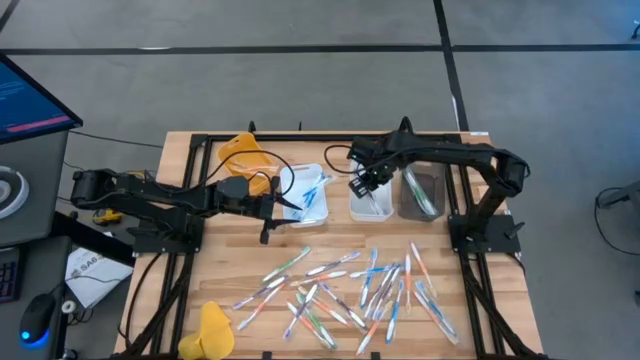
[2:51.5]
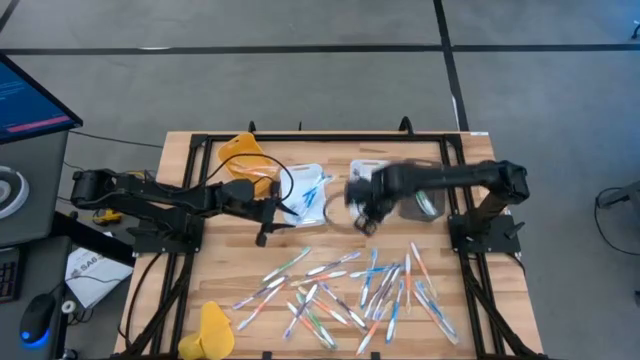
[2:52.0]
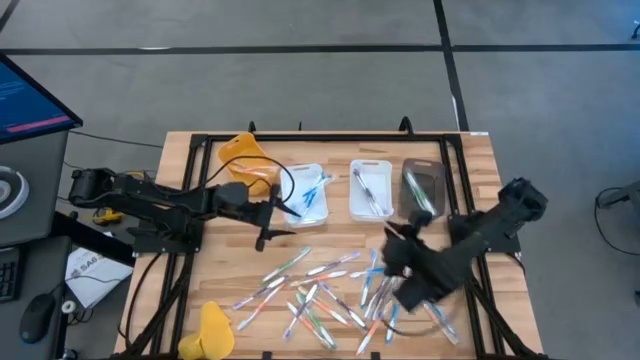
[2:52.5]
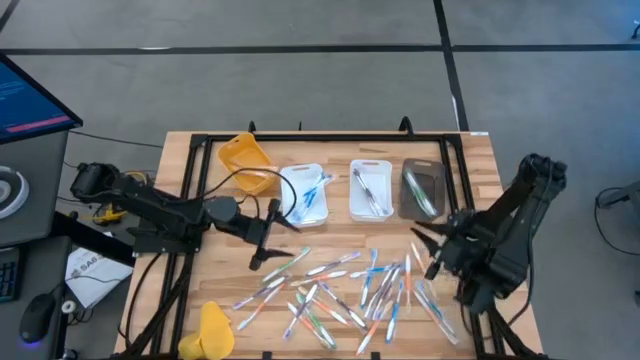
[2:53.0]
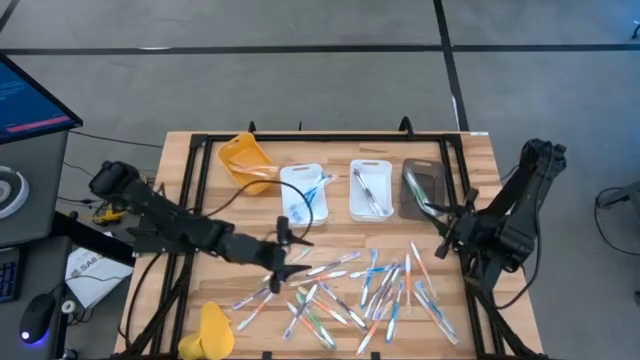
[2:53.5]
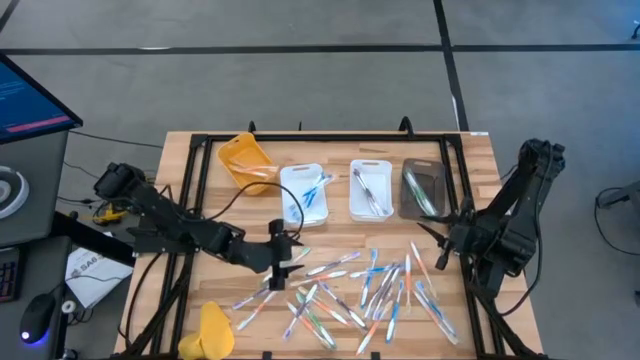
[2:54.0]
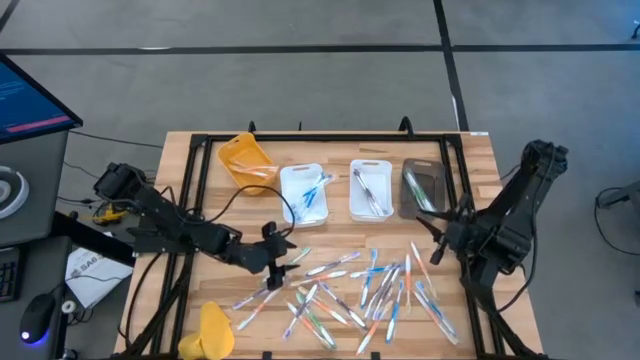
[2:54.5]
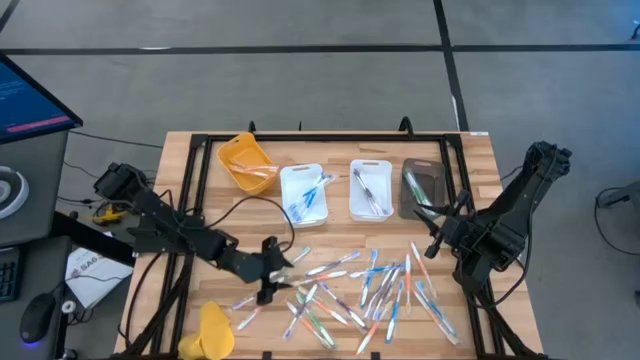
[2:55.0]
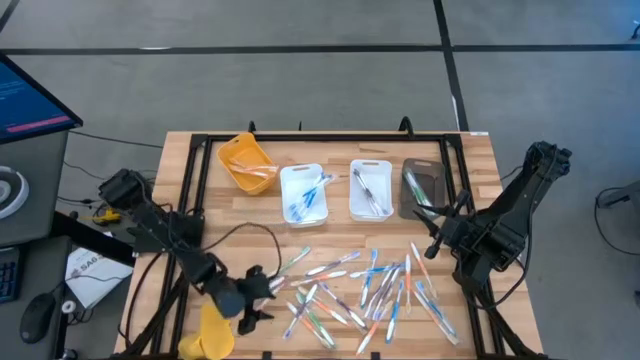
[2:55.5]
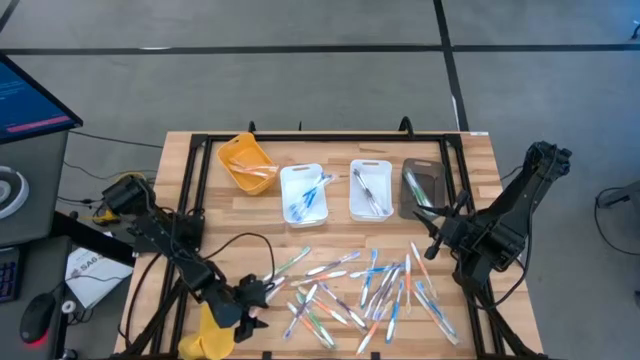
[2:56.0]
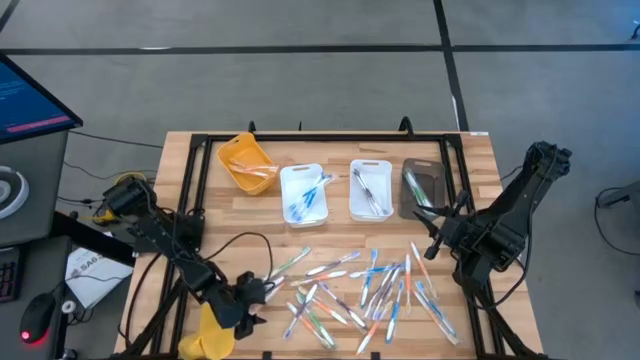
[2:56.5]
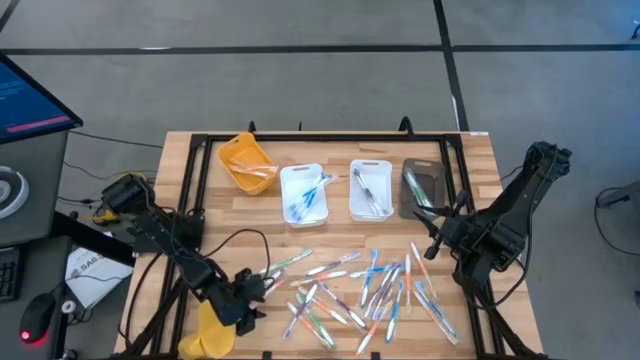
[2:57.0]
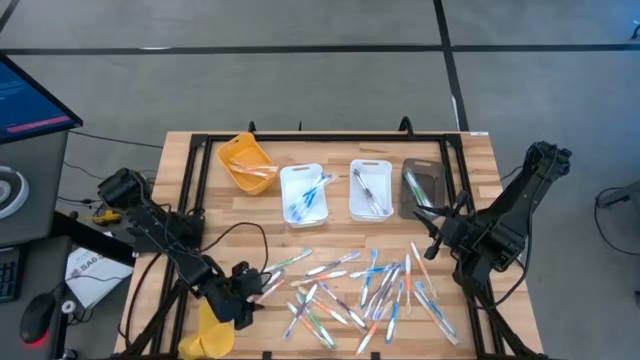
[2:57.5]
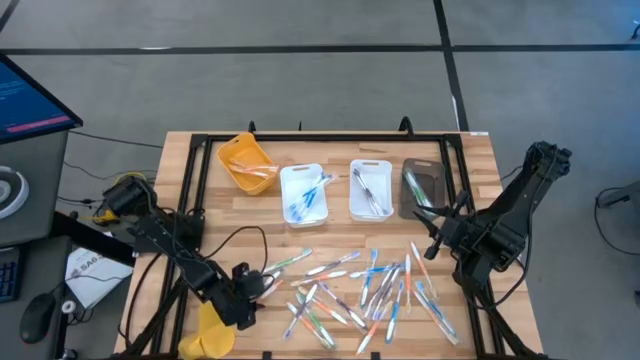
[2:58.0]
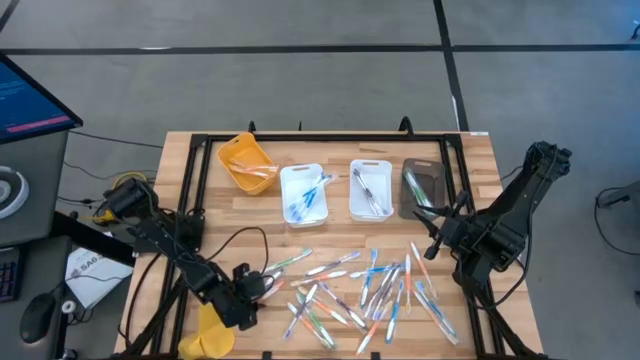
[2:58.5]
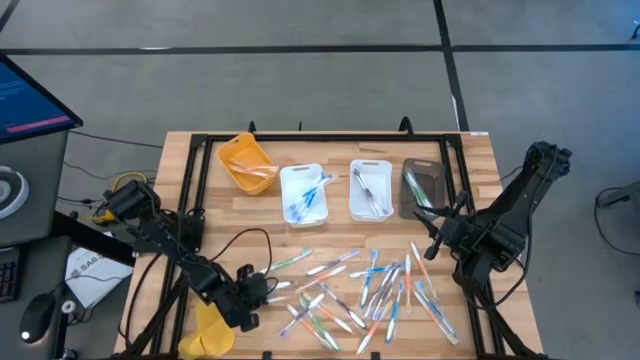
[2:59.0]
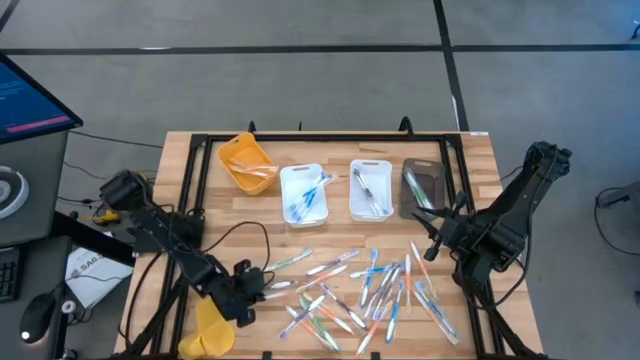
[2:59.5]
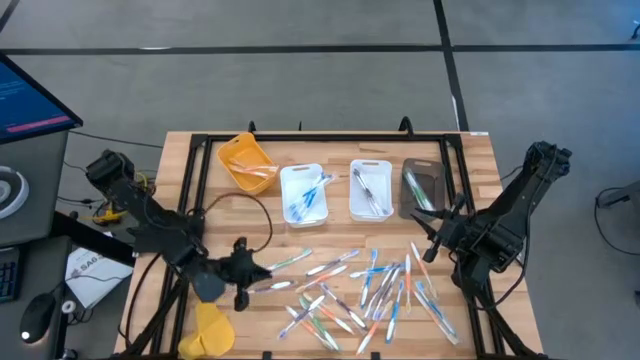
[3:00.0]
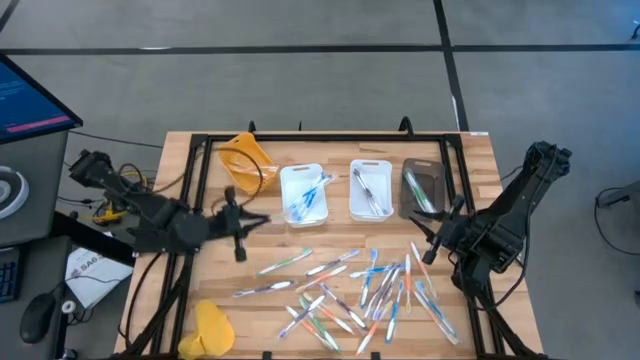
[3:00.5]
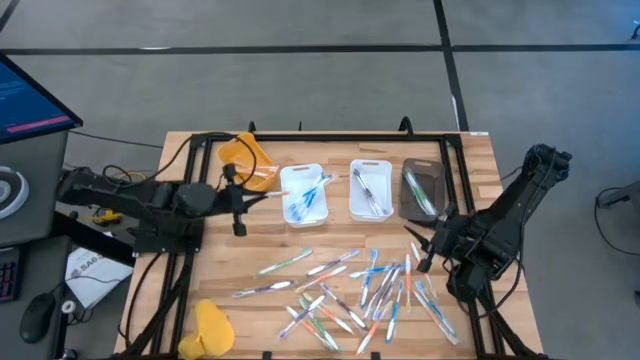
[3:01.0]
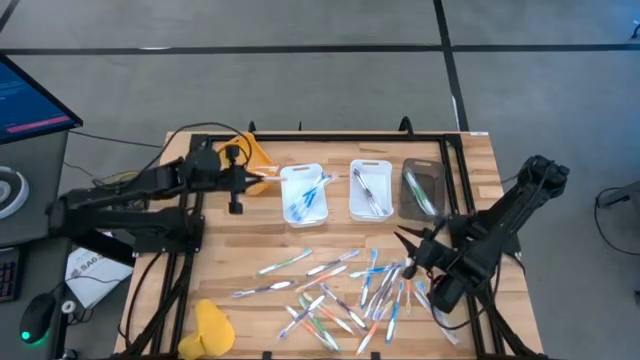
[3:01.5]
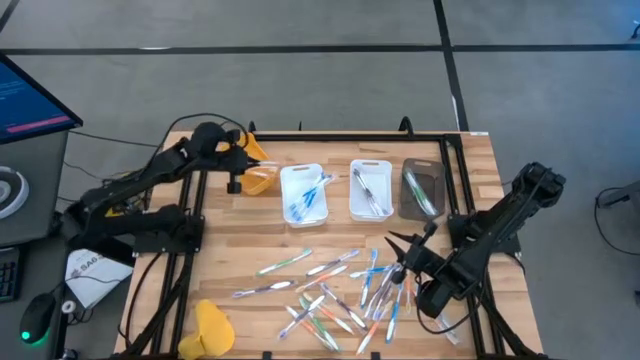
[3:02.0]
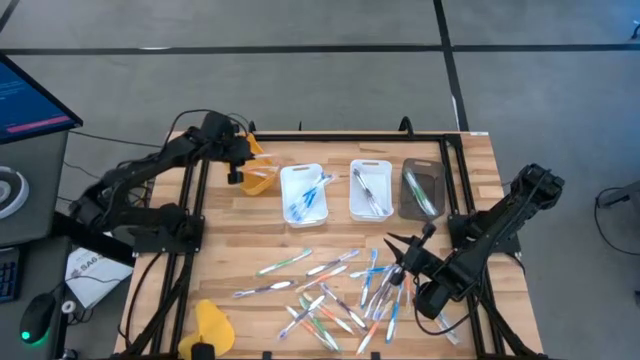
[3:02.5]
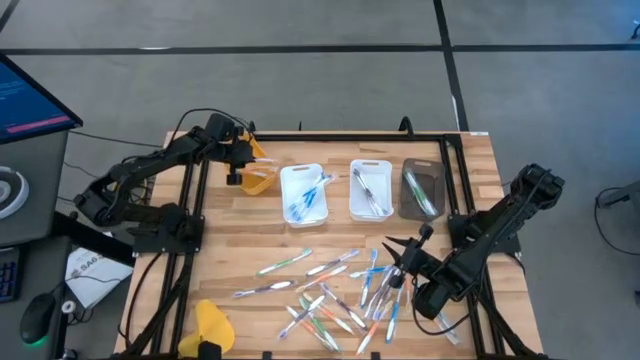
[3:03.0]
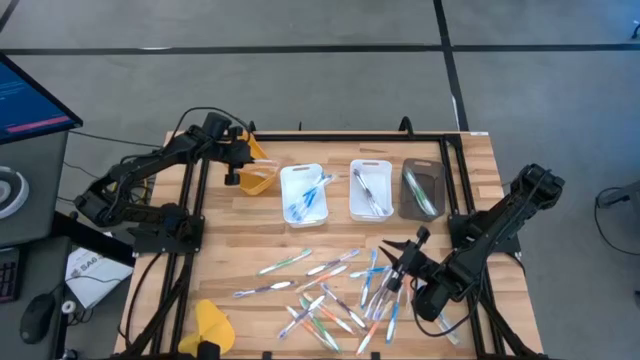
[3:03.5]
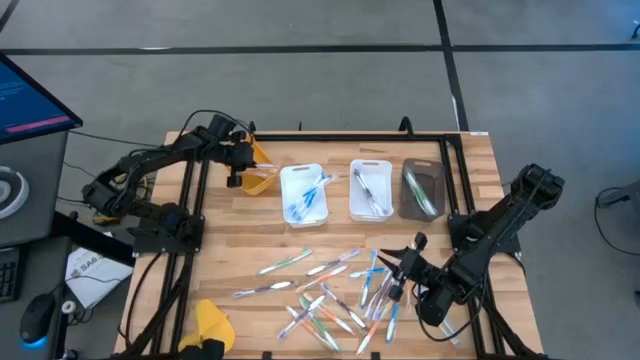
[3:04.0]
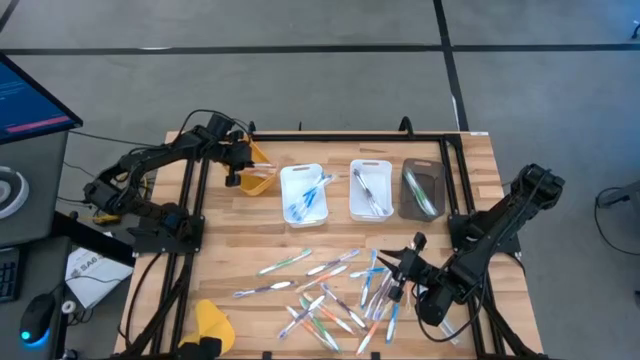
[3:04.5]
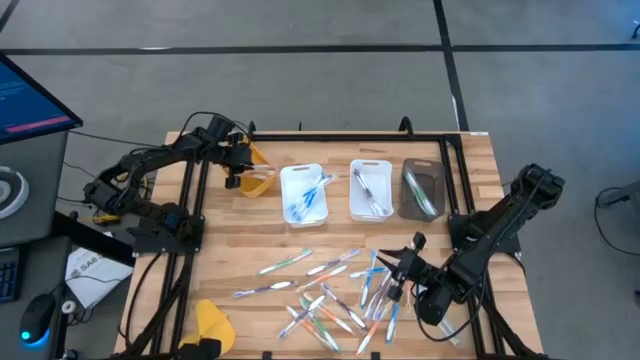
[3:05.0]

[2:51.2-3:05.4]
Task: Pick & Place Toothbrushes
Put the orange toothbrush into the orange bin

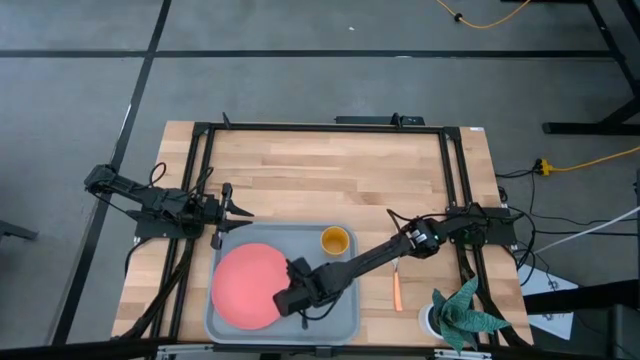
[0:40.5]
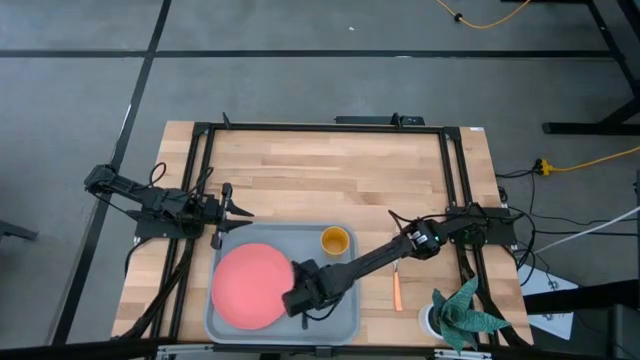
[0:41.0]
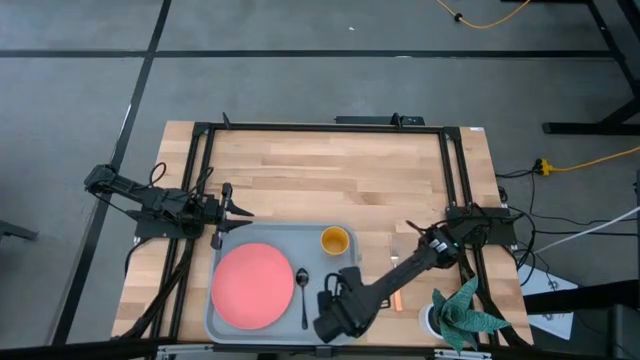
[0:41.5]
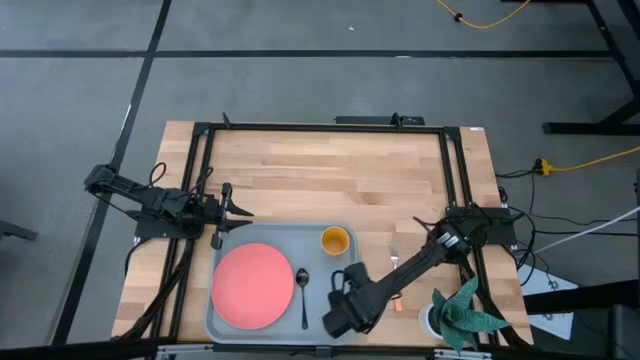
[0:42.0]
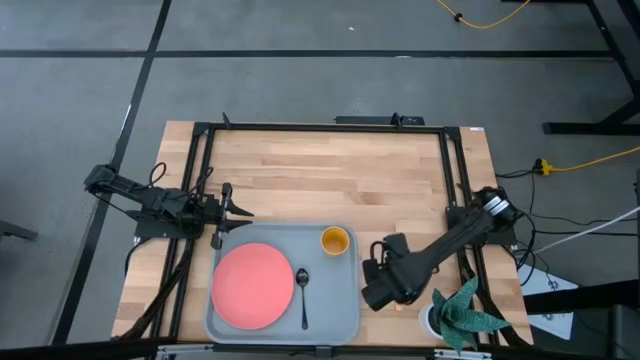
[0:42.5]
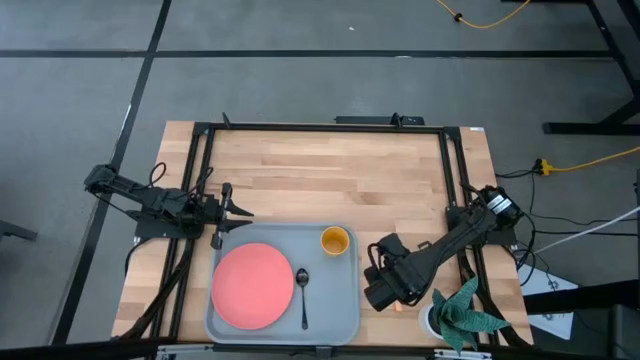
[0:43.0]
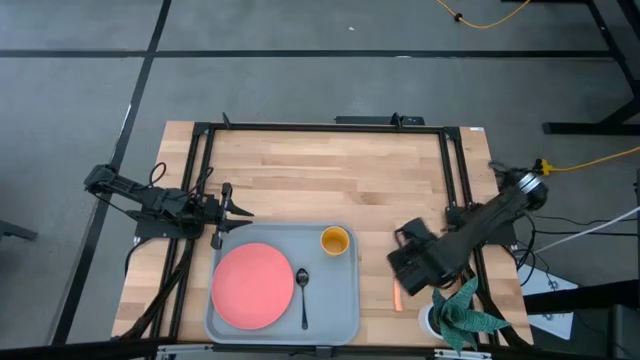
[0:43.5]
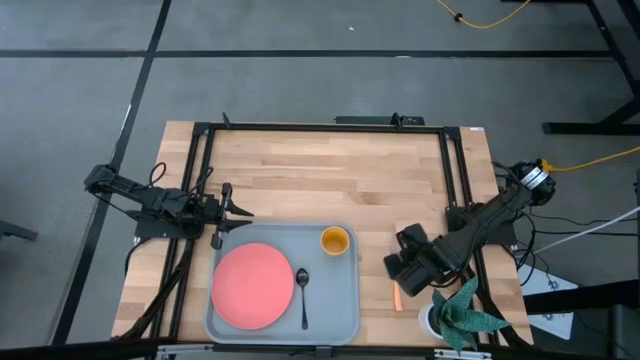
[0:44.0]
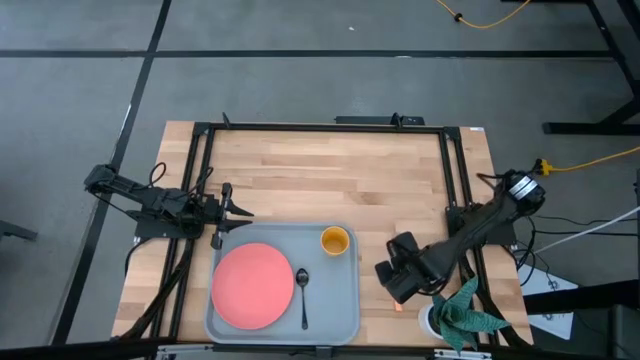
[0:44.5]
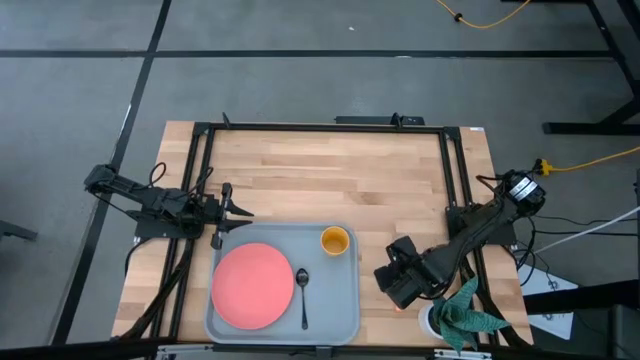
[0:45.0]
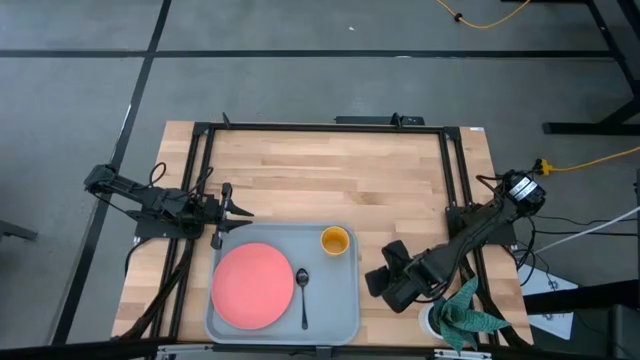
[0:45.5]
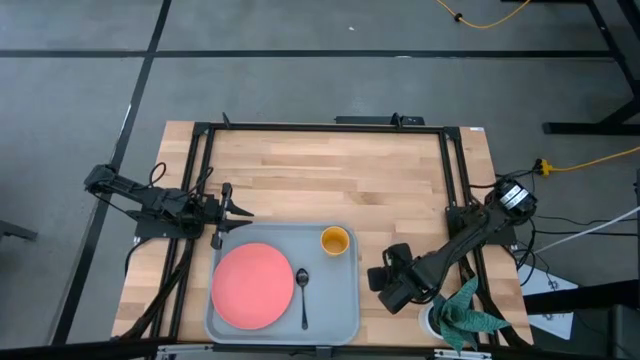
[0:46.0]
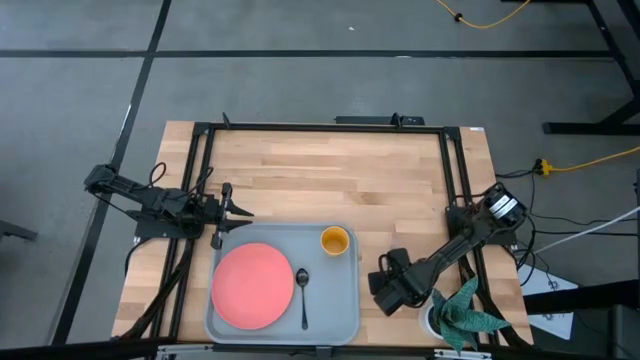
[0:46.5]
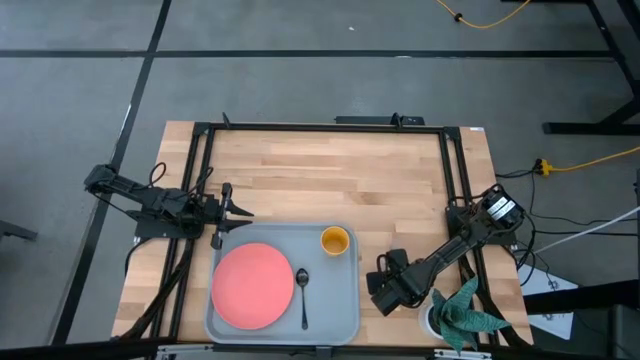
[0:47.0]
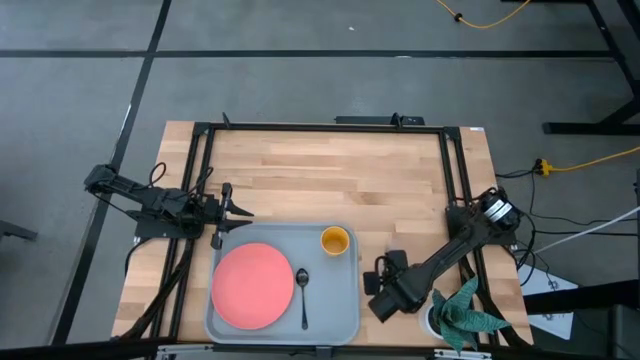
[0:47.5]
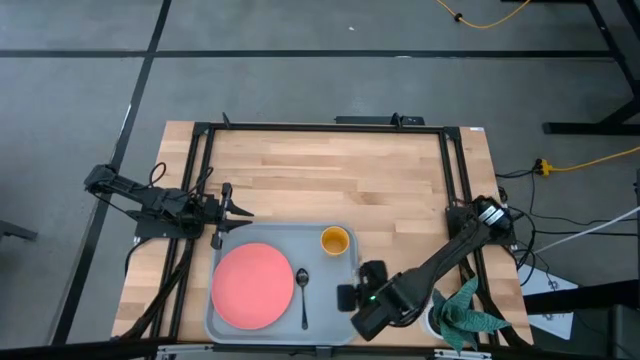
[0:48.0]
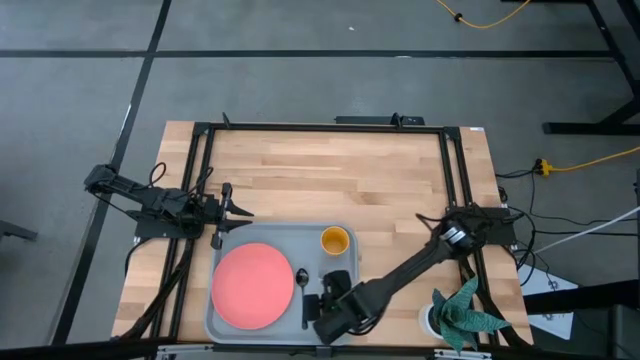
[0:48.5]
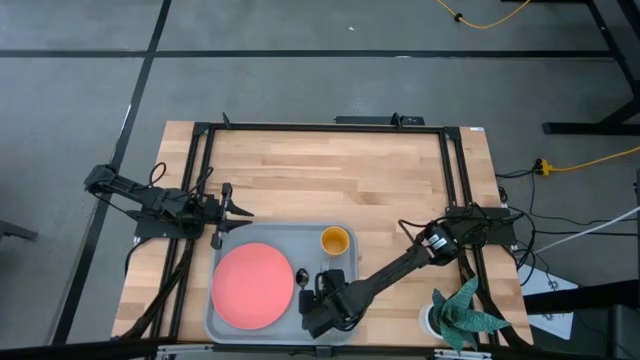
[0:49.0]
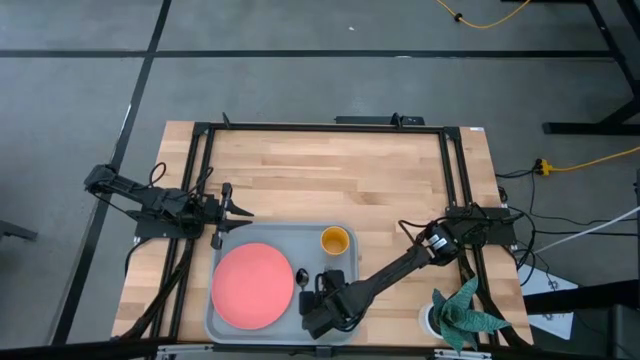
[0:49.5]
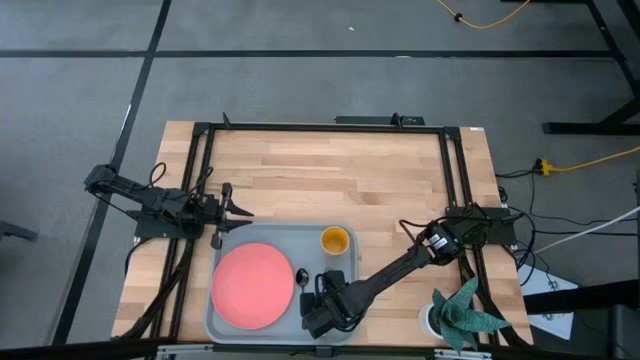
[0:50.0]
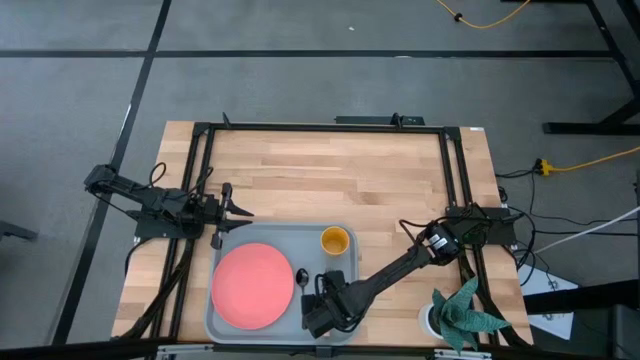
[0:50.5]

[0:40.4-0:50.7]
Task: Pick and place plate/cup/fork/spoon on tray
Put the orange fork on the gray tray to the right of the black spoon
